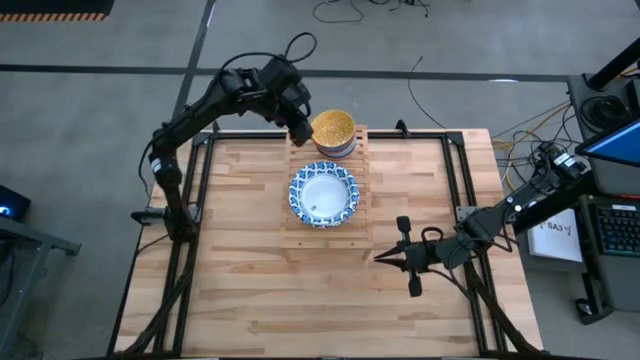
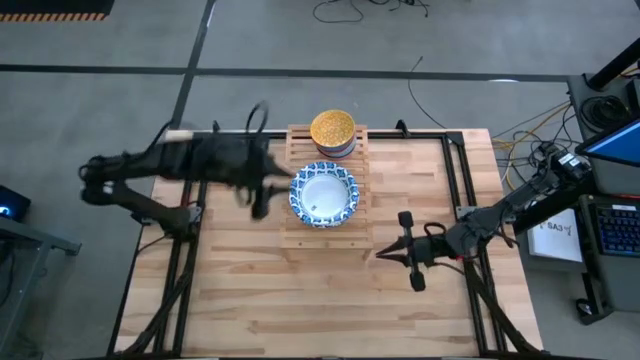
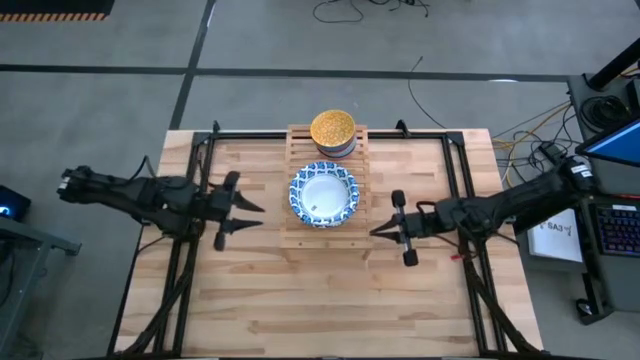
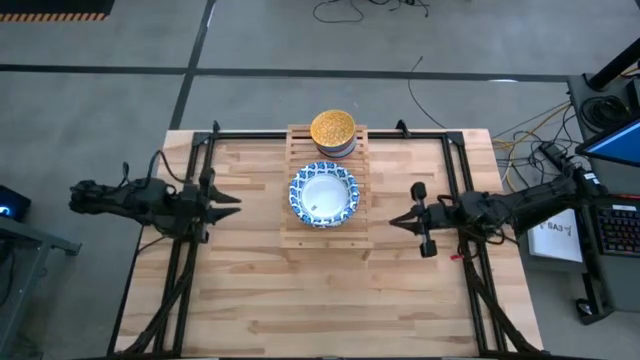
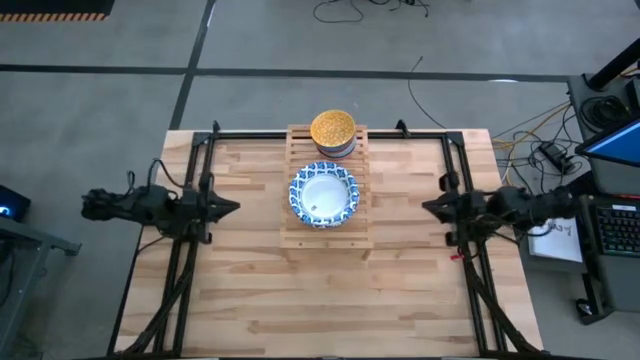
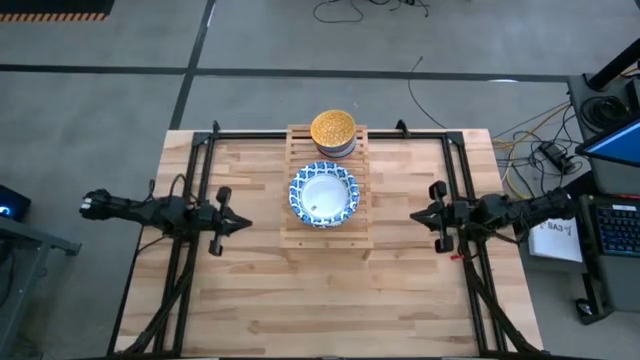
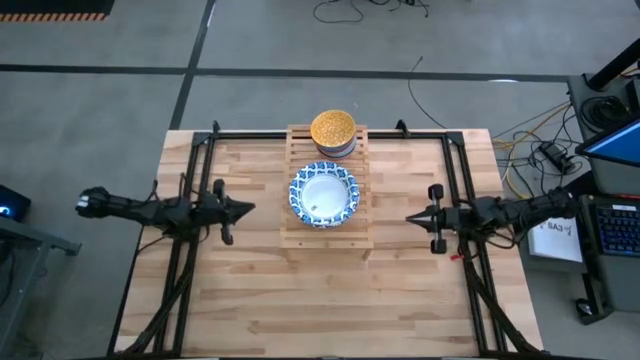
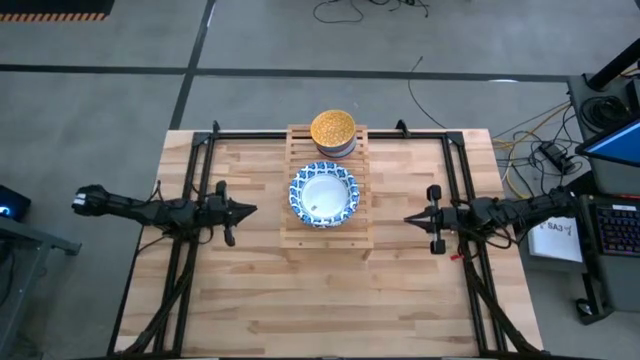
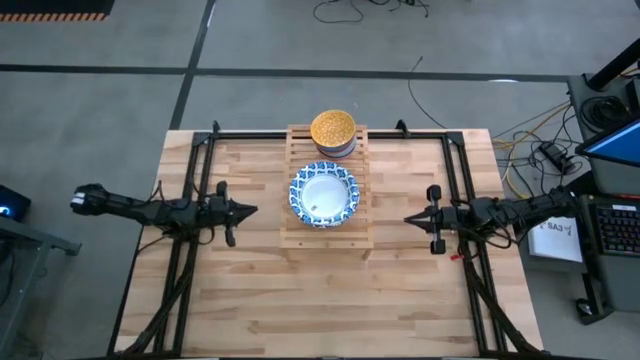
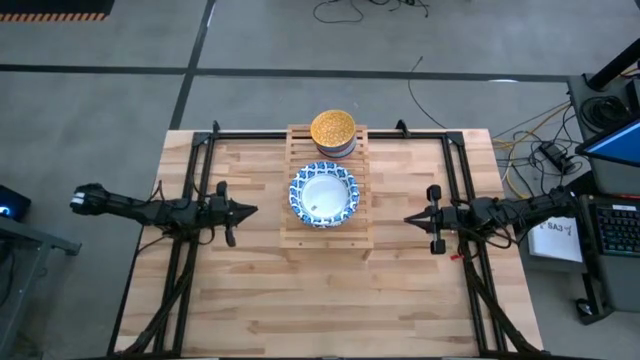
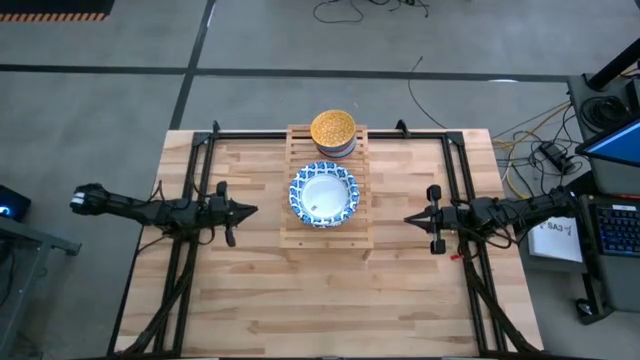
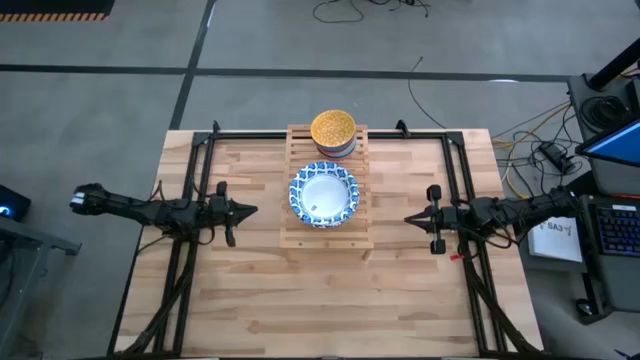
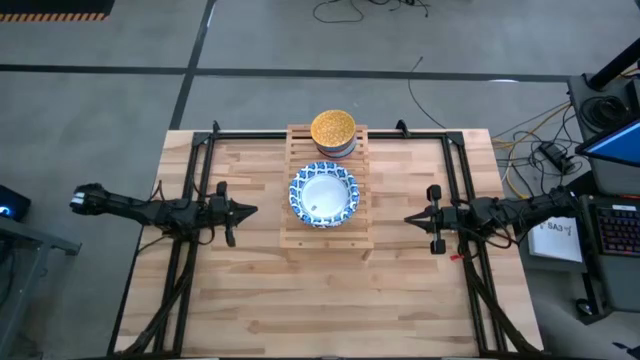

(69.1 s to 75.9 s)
Task: Place and stack bowls onto a shelf
Return to Home Position

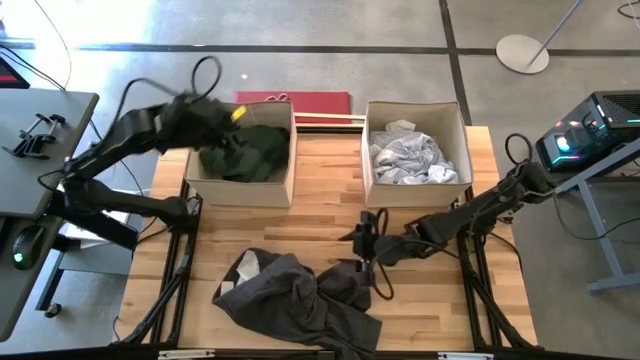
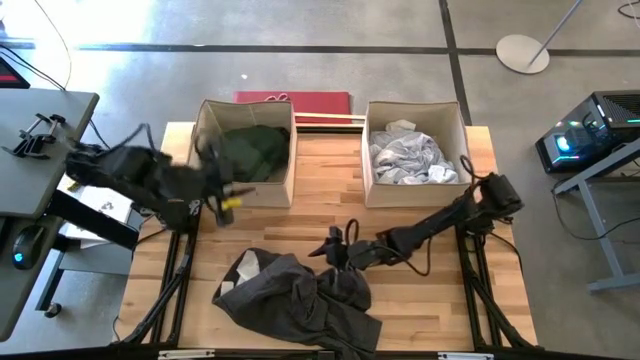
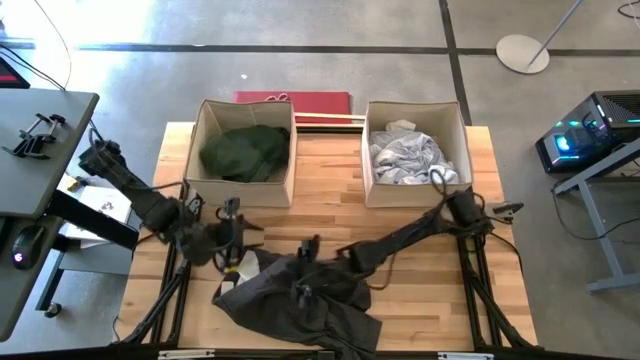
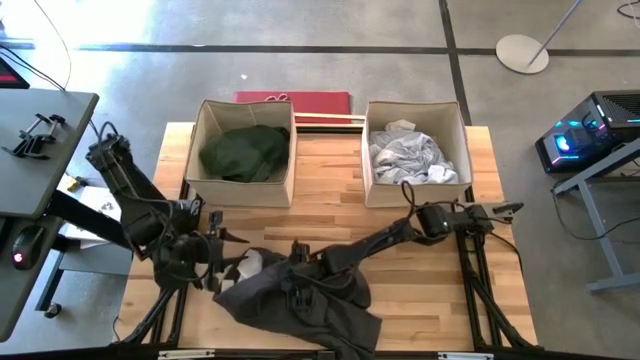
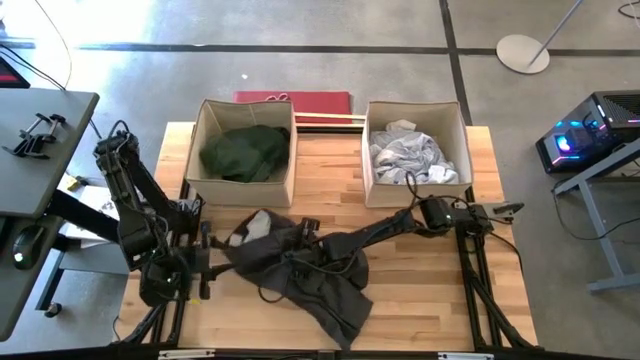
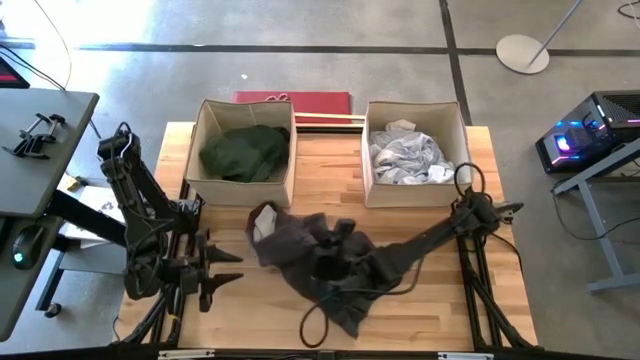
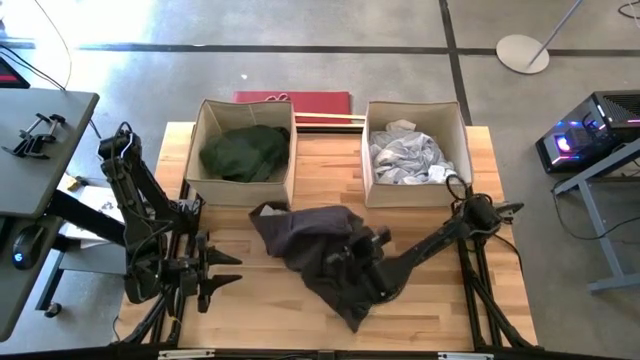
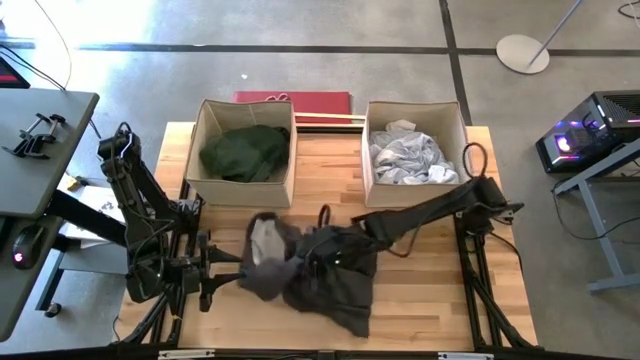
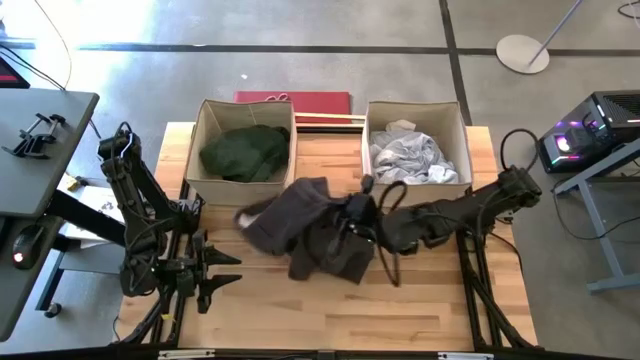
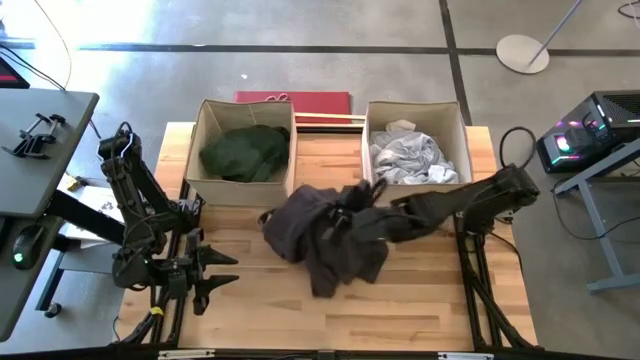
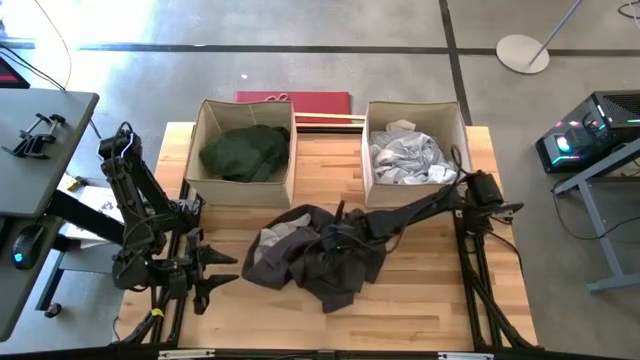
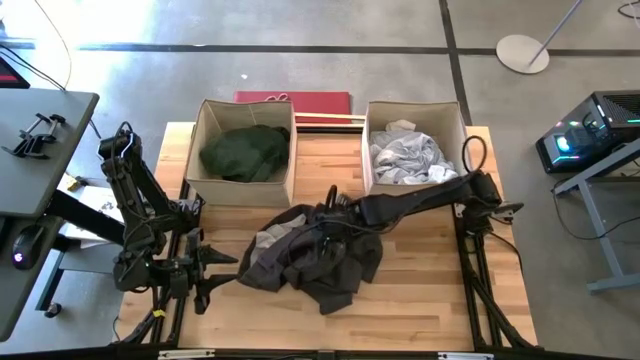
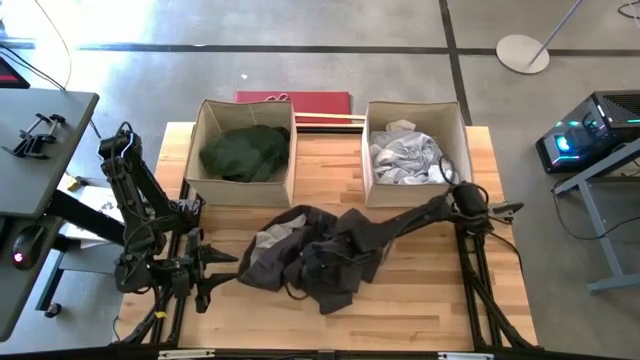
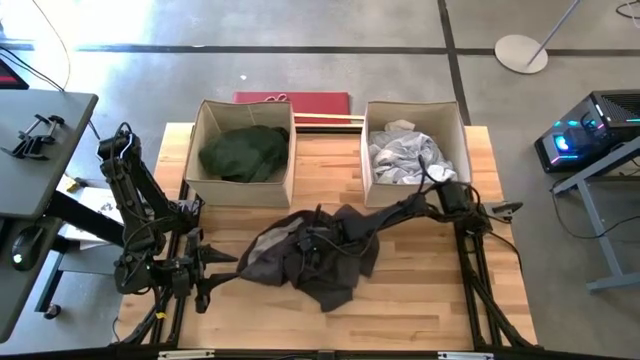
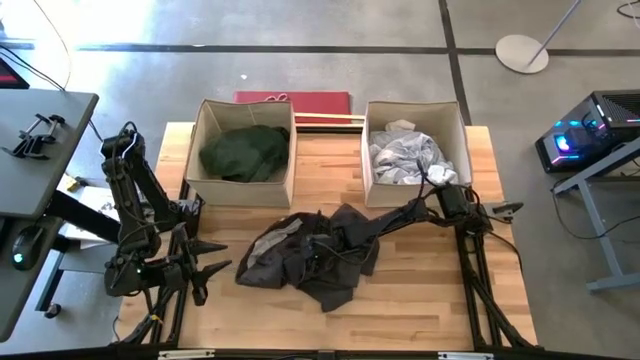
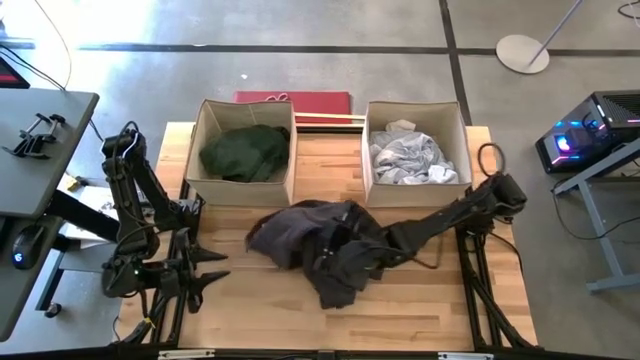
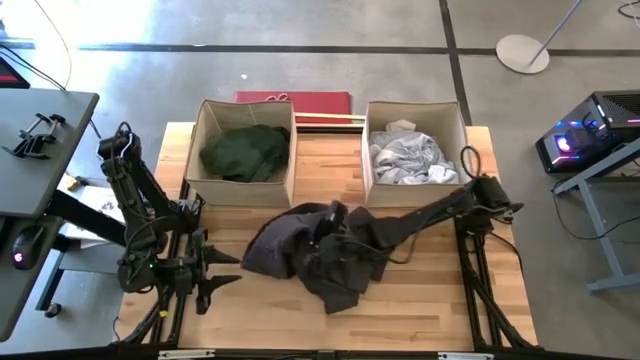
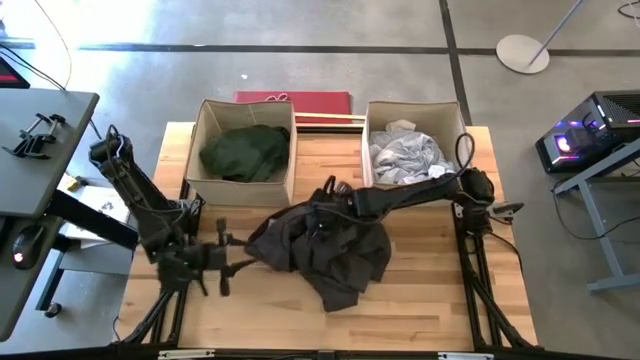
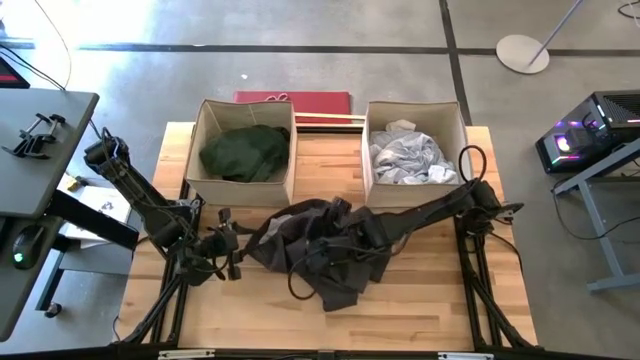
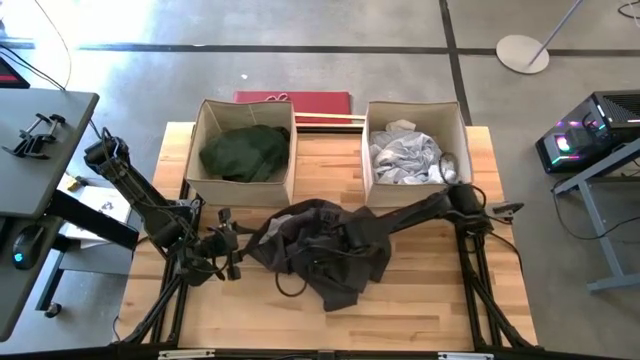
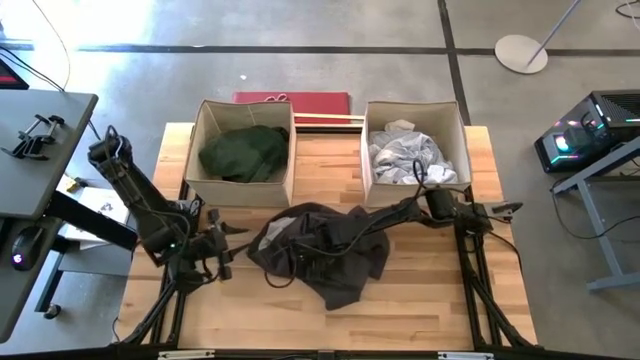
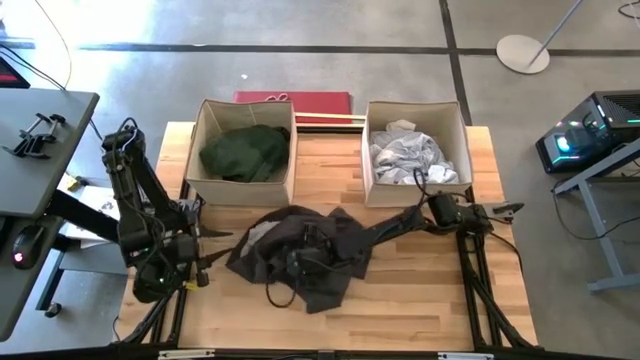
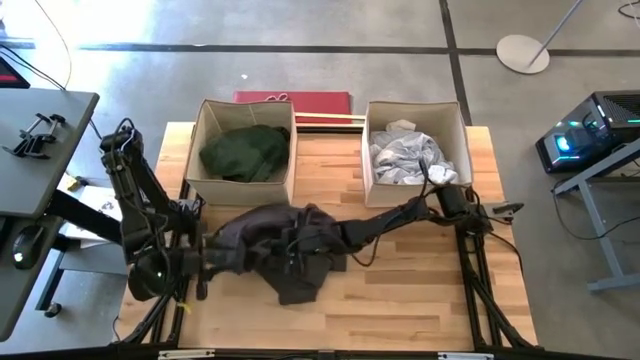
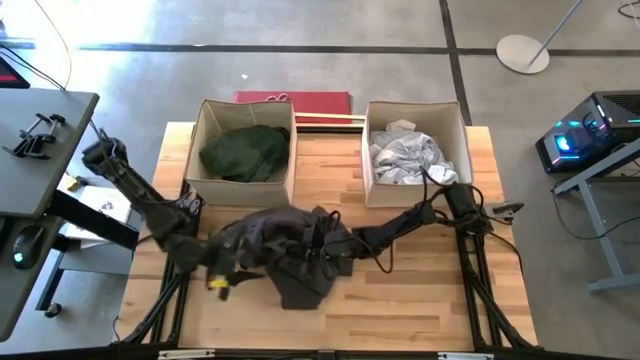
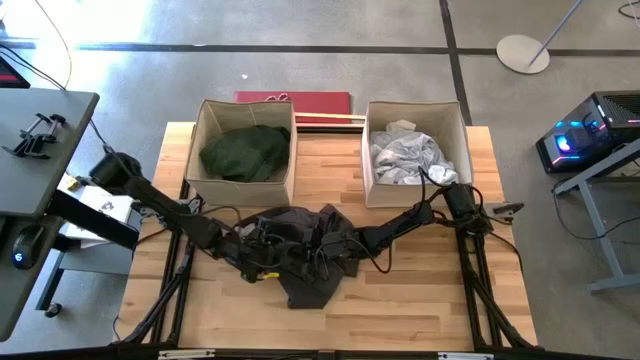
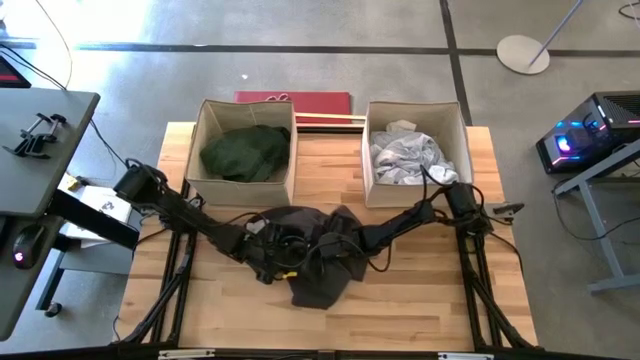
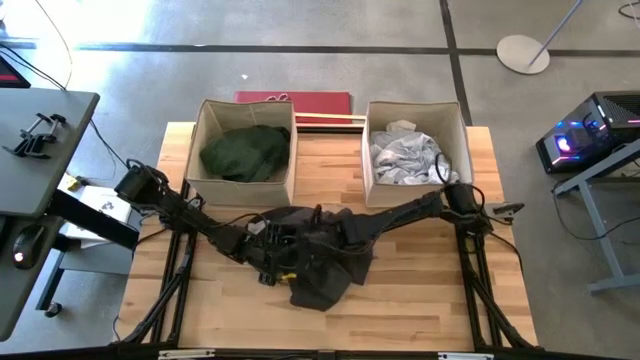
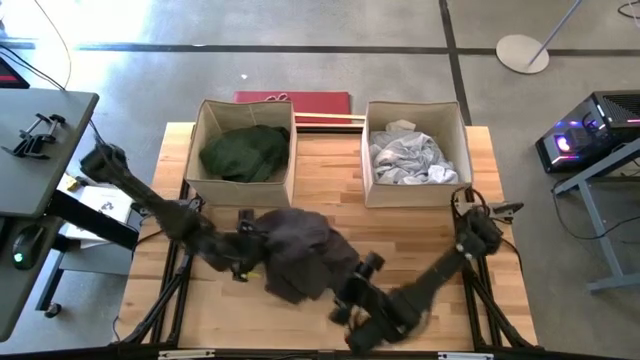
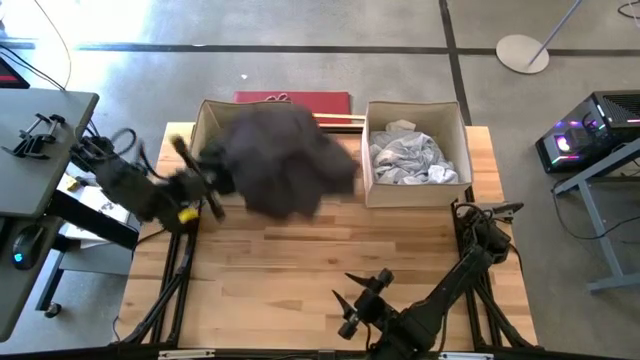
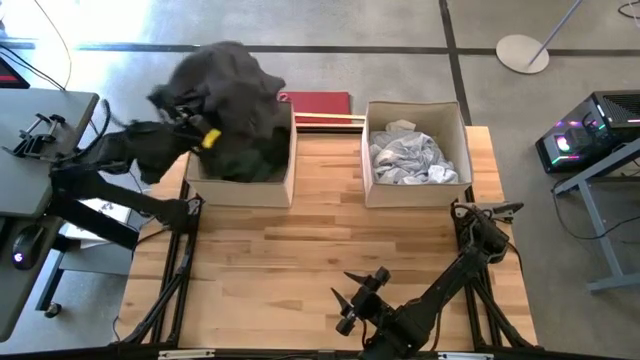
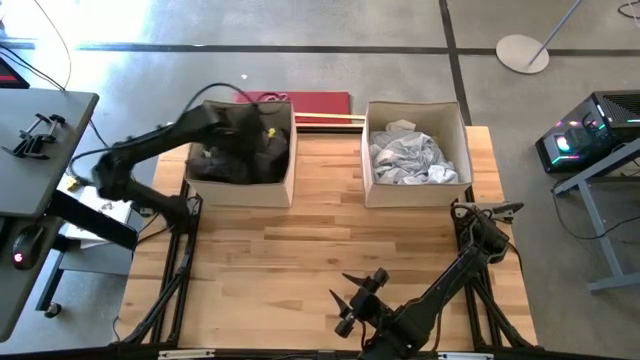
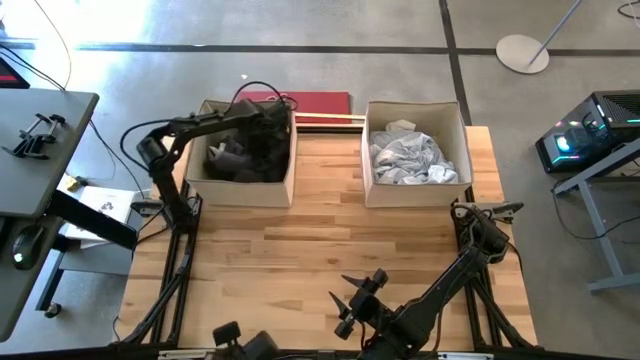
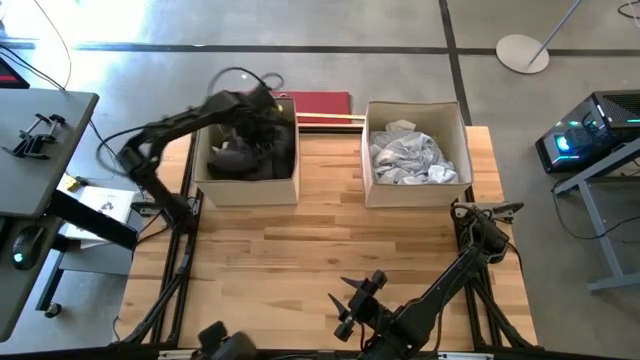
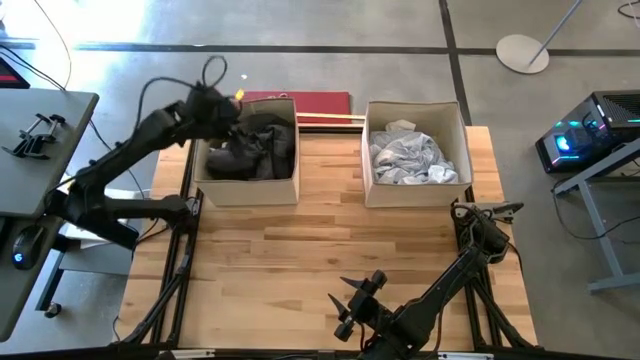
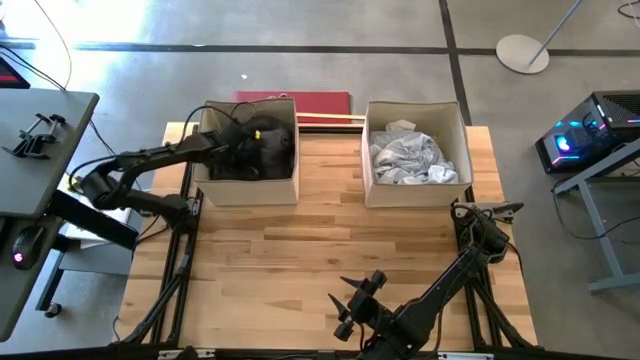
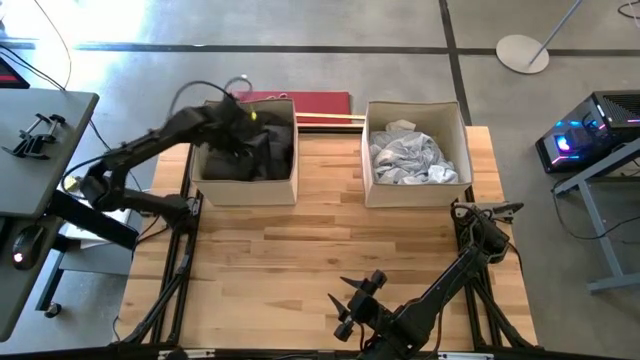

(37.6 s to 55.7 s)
Task: Sort clothes
Put the grey shorts into the left brown laundry bin
